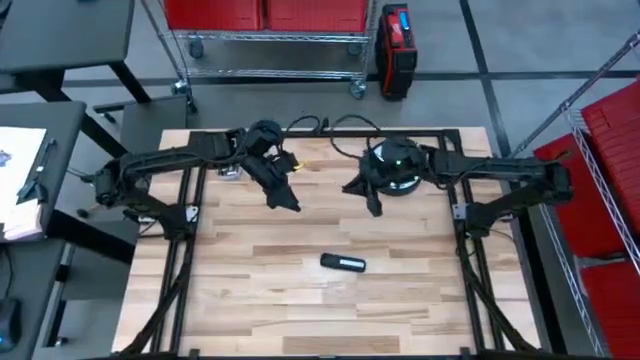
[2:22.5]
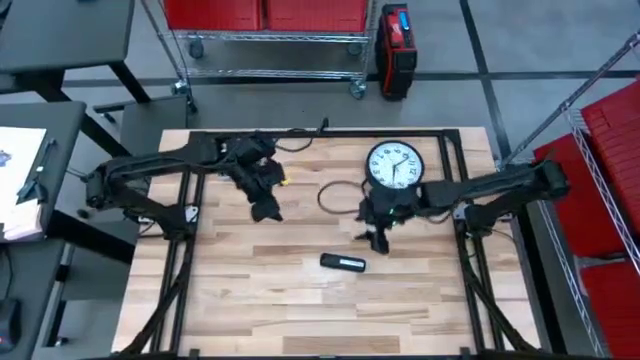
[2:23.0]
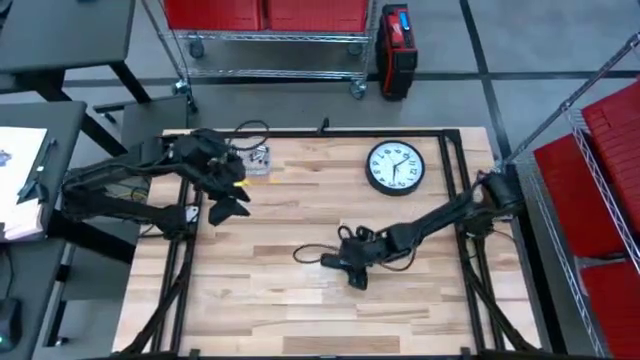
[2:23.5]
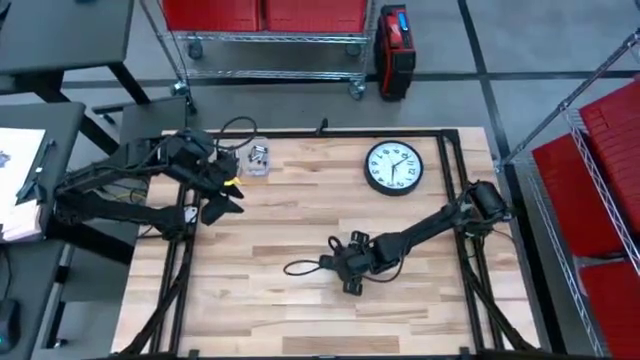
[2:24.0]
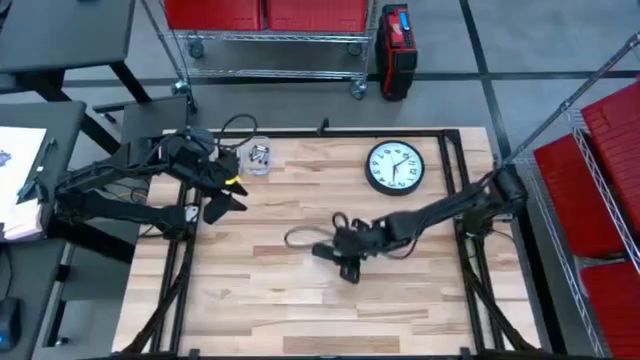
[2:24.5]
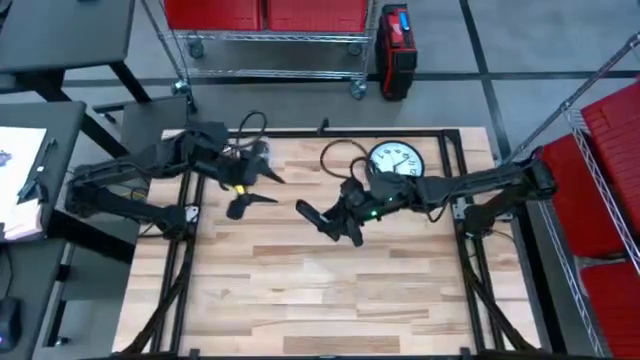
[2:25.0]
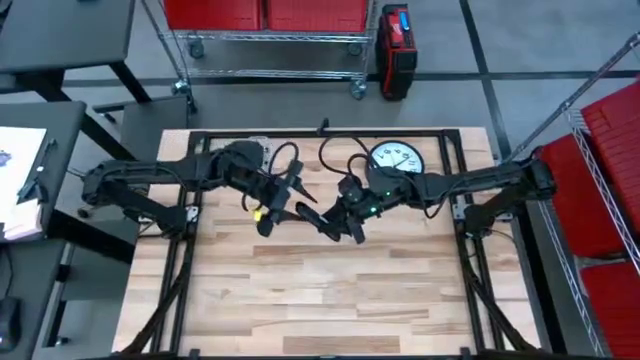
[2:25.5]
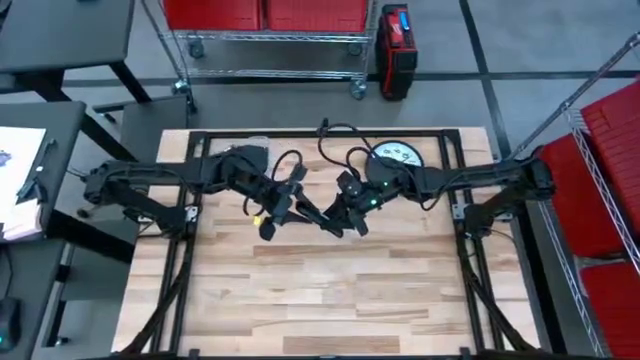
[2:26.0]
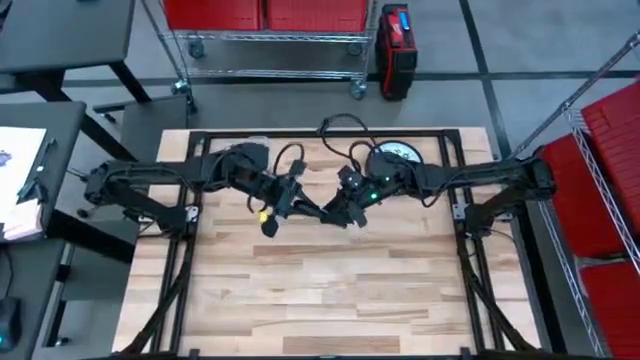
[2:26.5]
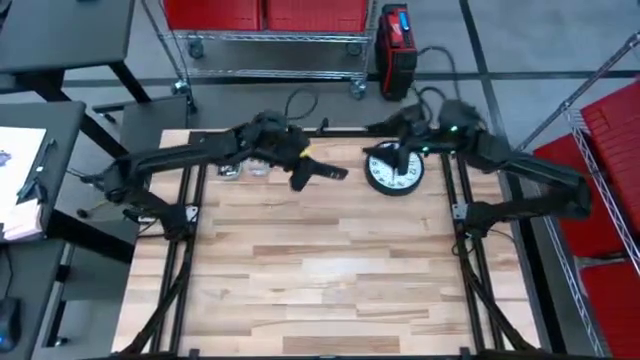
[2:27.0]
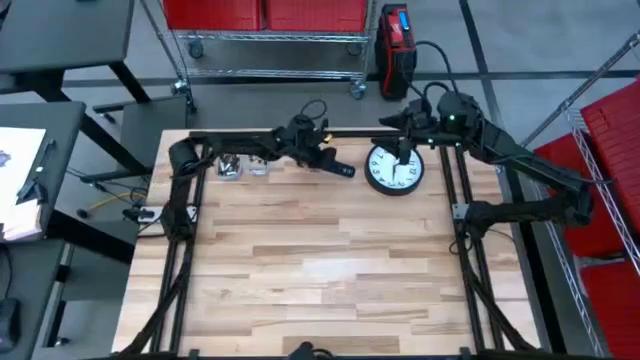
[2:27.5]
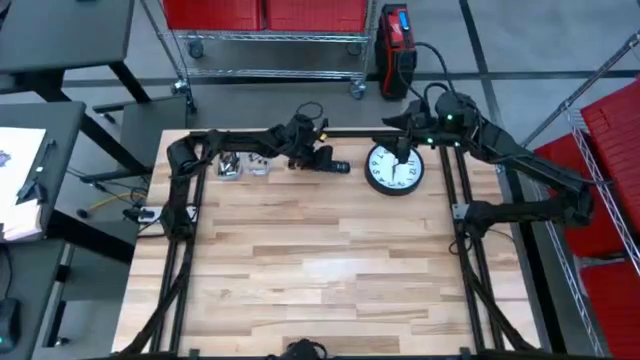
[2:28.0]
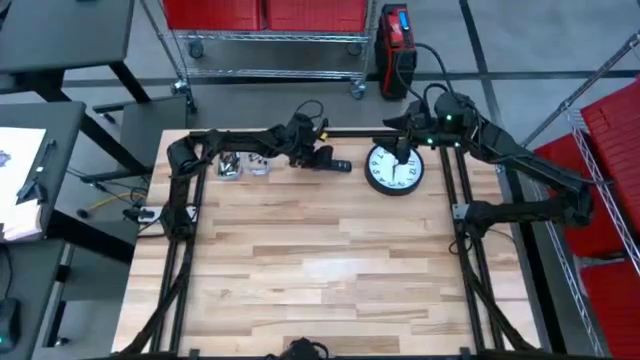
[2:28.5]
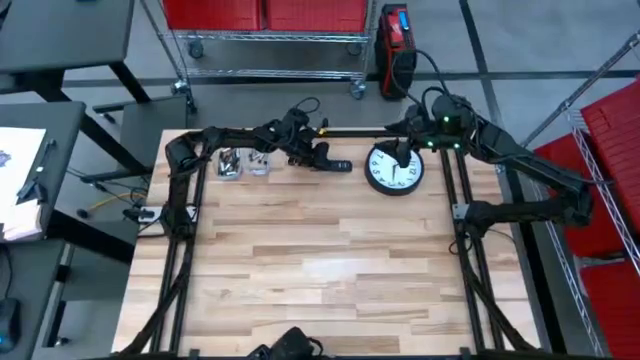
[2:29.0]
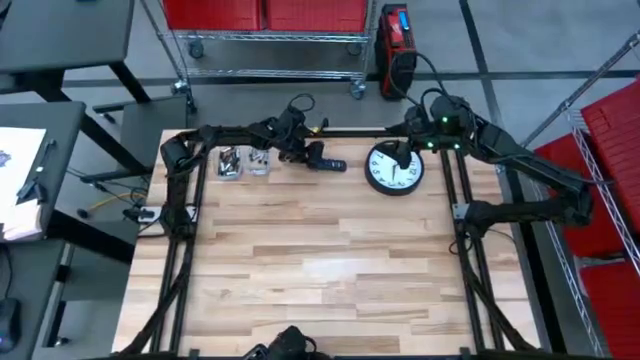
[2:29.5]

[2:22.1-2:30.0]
Task: Insert battery
Move the remote to the left of the wall clock on the table

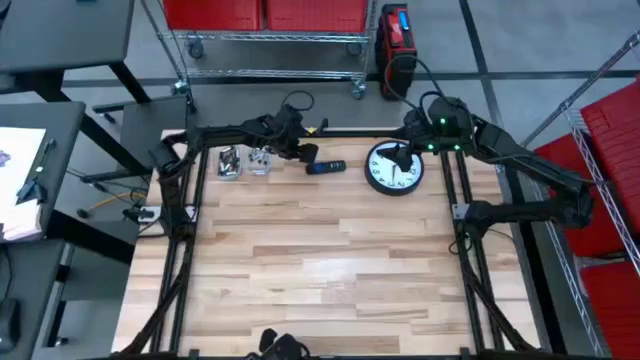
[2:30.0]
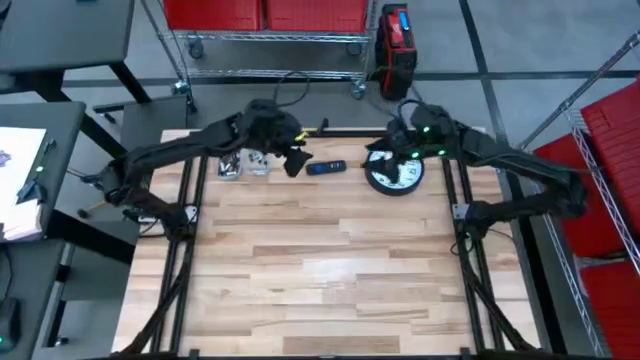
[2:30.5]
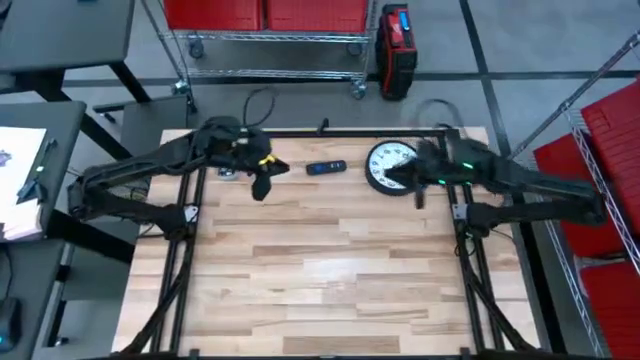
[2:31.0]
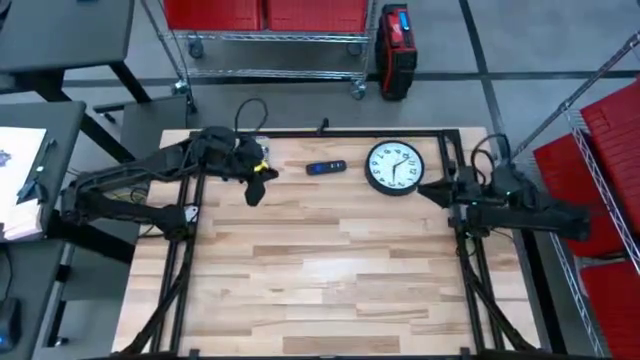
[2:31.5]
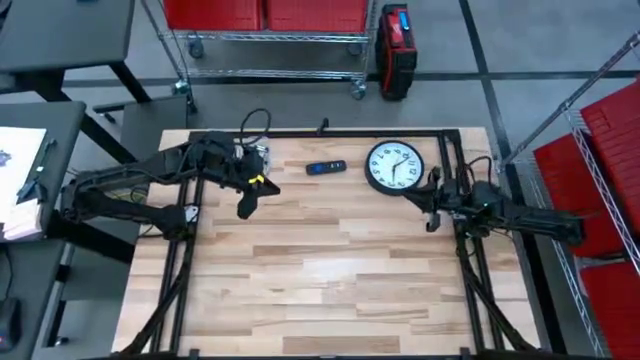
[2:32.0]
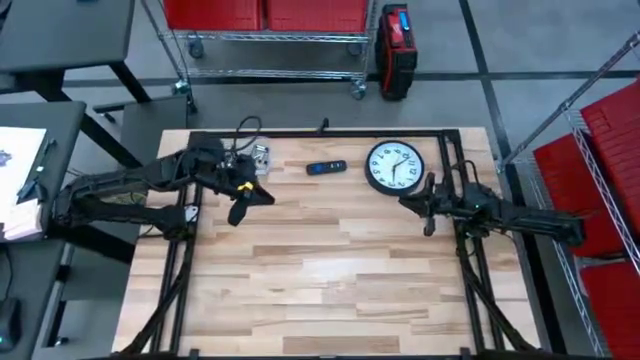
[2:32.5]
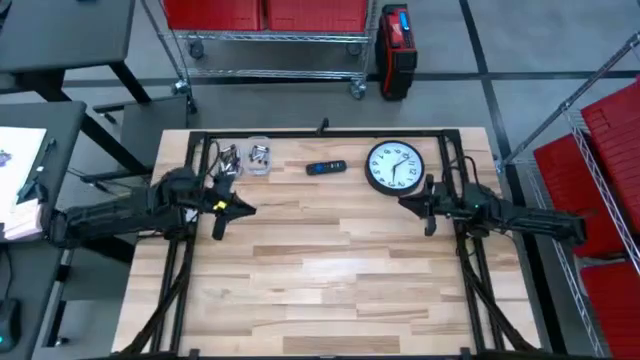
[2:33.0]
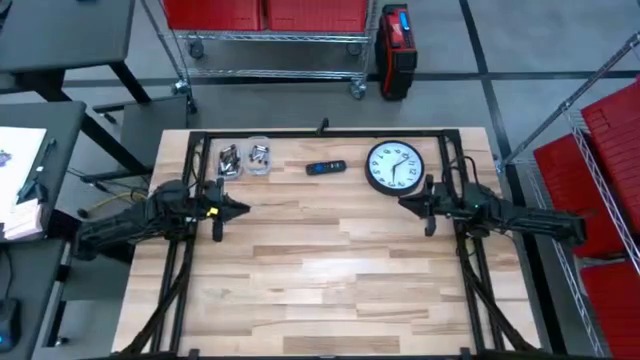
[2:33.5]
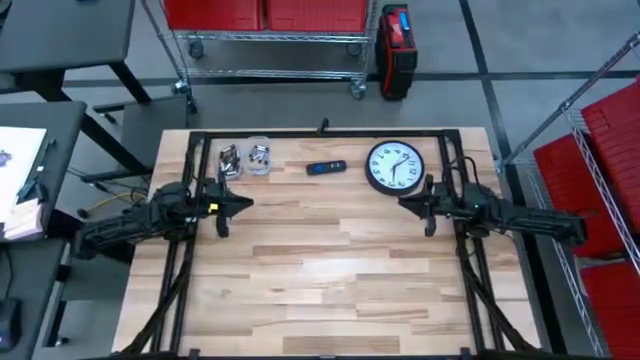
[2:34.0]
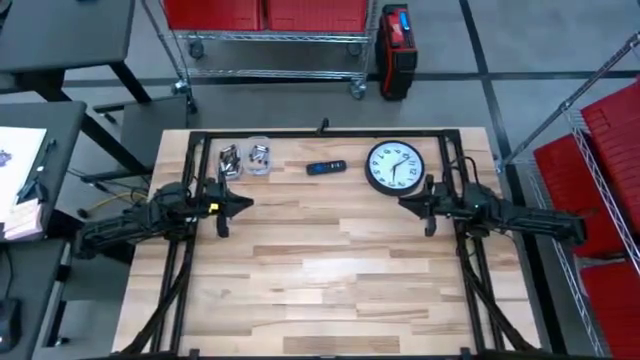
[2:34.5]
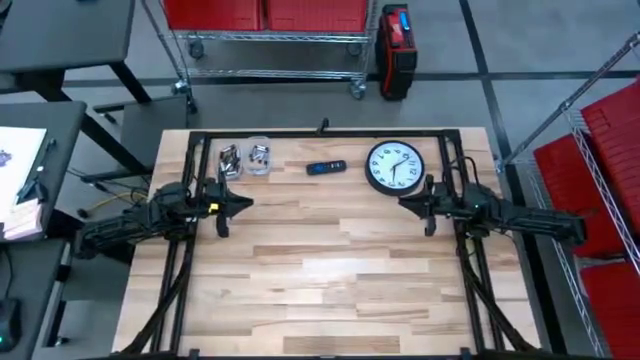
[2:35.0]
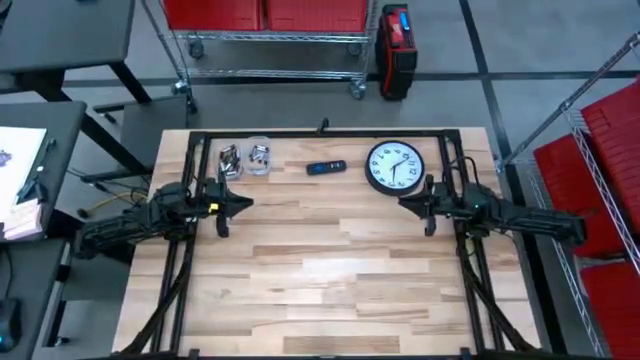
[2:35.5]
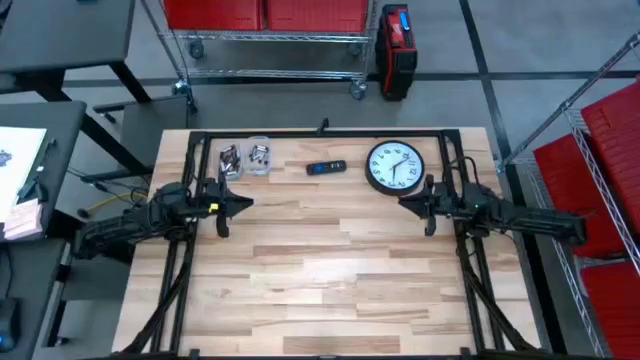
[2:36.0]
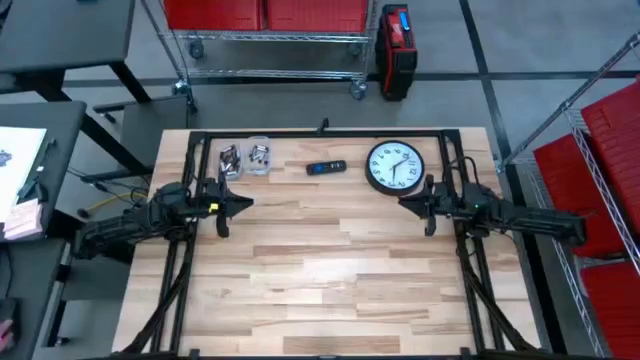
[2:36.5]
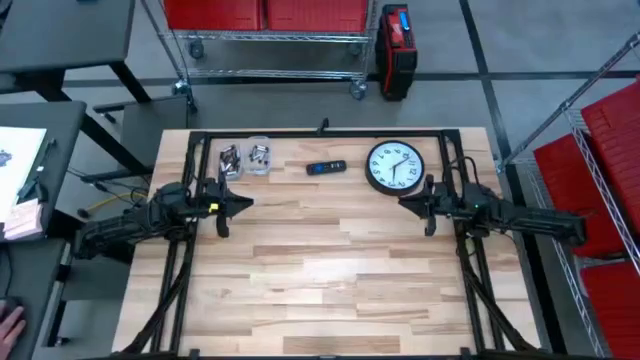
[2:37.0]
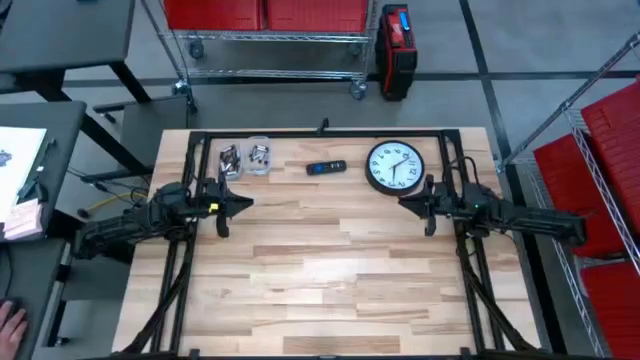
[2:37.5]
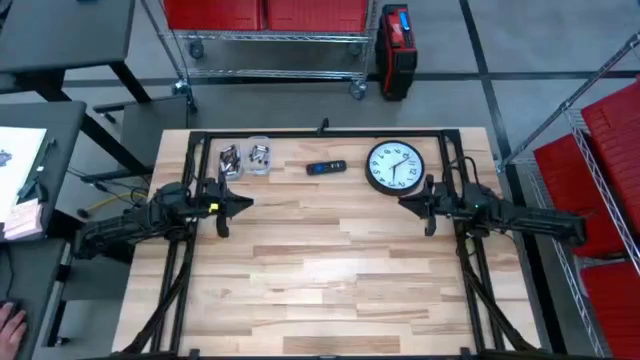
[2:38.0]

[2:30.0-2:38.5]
Return to Home Position

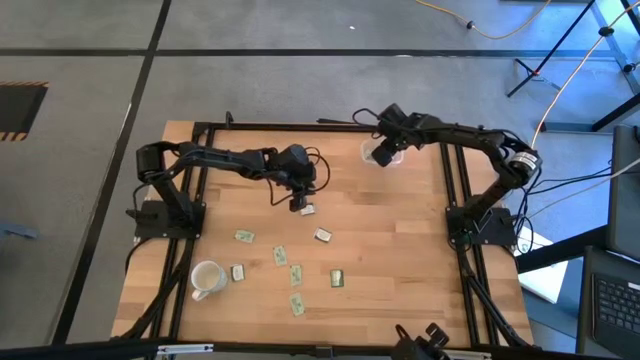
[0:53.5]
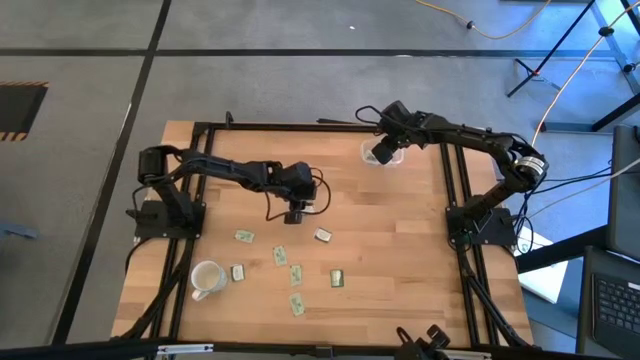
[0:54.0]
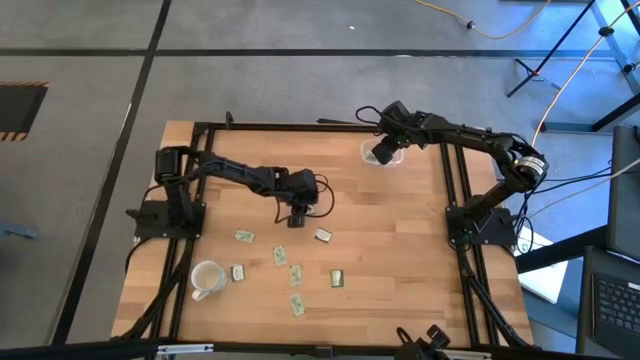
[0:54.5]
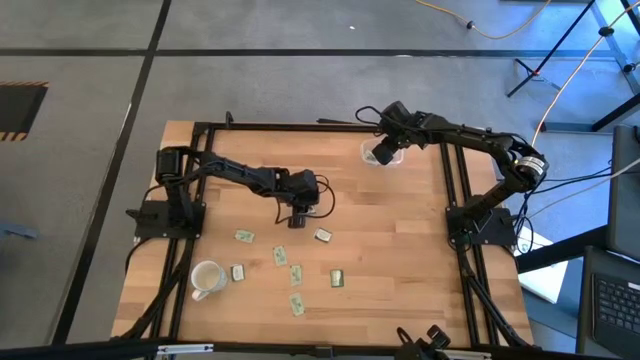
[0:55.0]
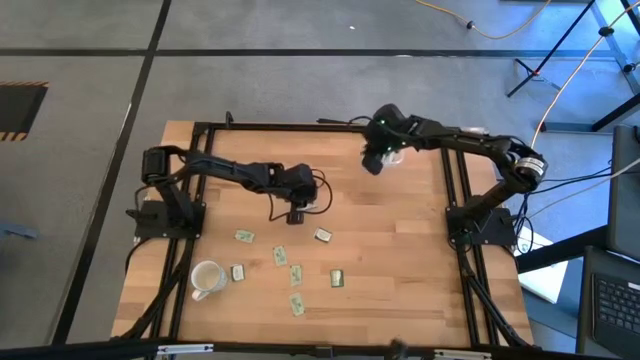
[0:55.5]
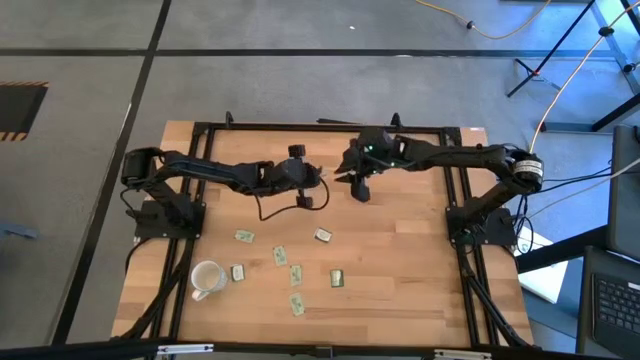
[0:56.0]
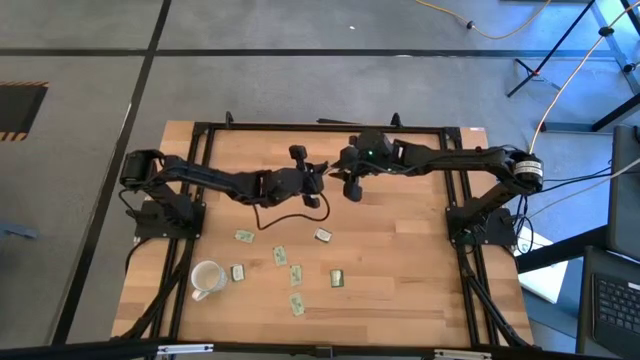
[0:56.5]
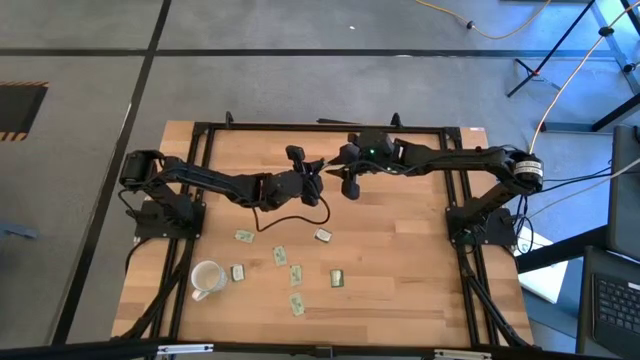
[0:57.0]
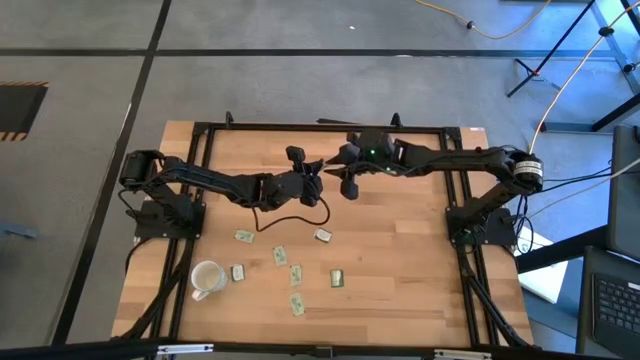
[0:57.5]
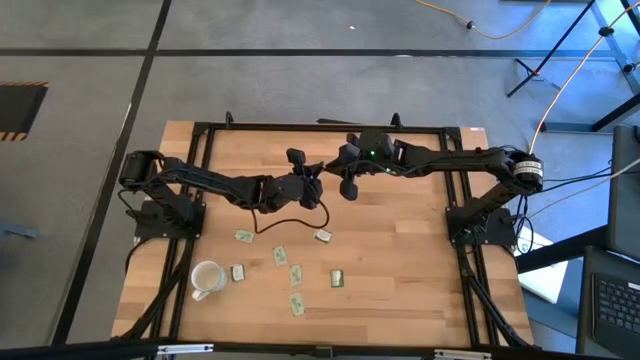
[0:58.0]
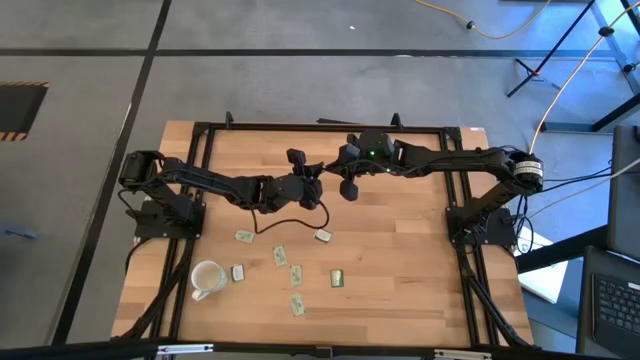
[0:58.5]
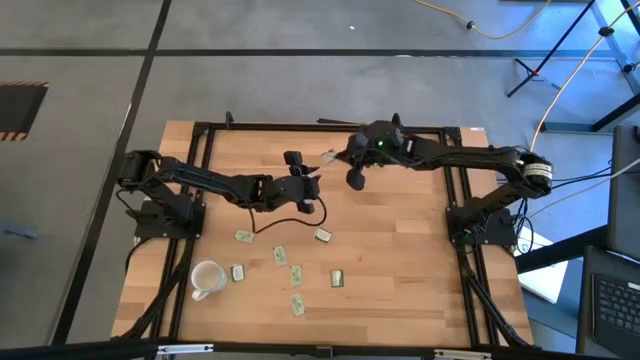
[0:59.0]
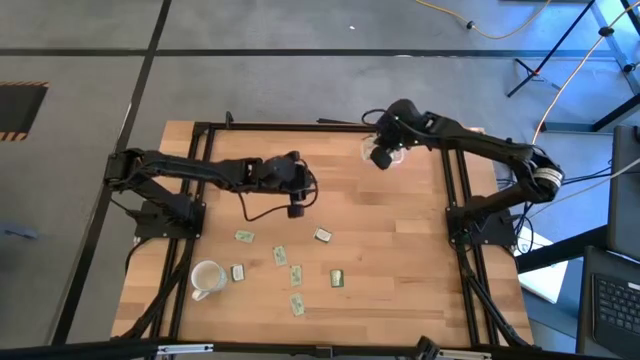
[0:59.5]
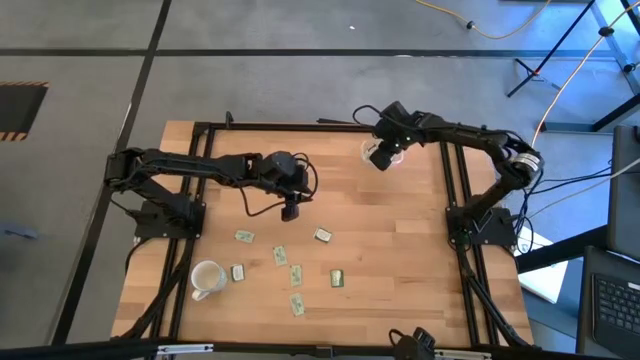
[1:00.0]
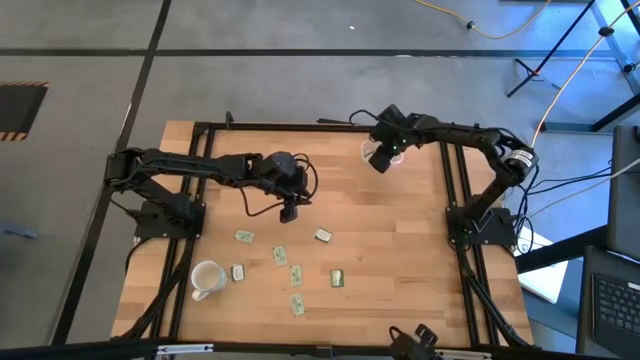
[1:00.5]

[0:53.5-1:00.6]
Task: Pick and place Stevia / Truvia into bins
Put the dark green truvia packet into the transparent container
